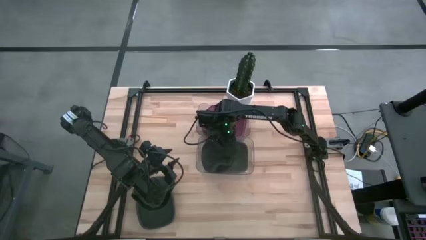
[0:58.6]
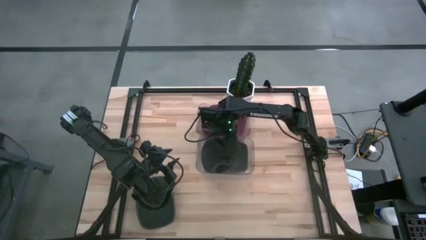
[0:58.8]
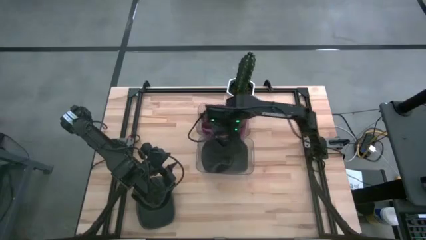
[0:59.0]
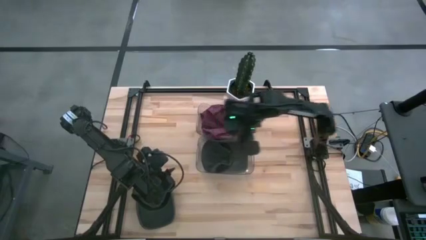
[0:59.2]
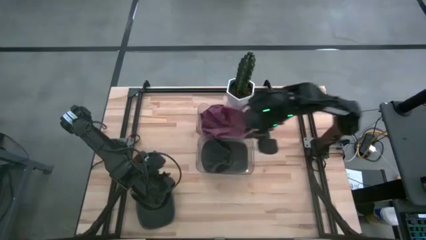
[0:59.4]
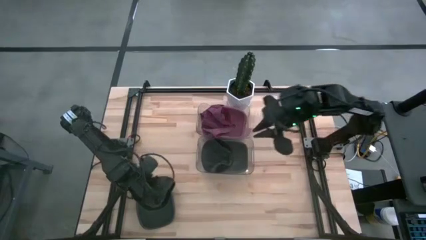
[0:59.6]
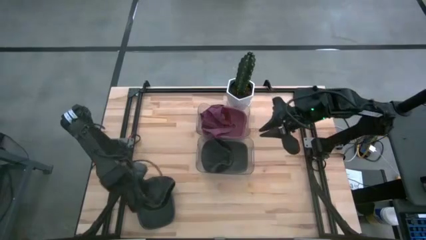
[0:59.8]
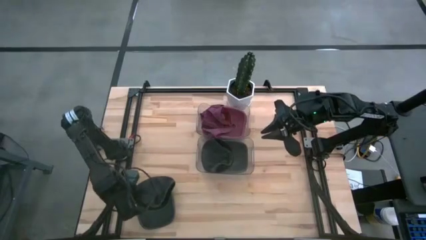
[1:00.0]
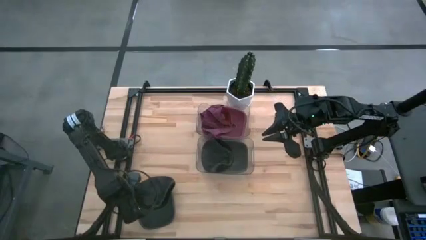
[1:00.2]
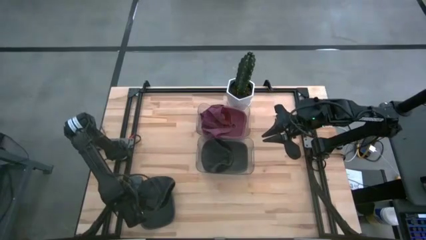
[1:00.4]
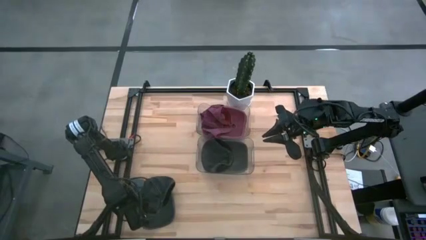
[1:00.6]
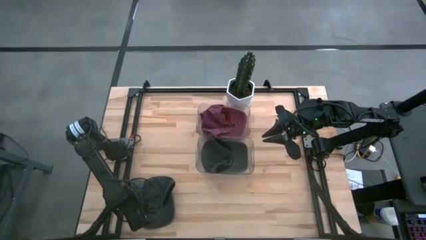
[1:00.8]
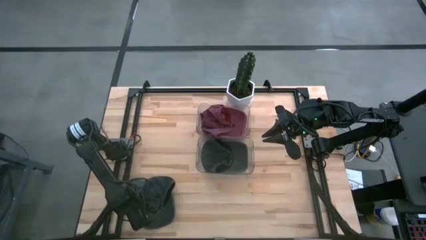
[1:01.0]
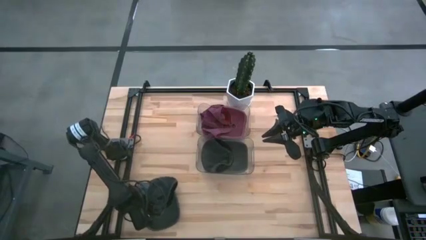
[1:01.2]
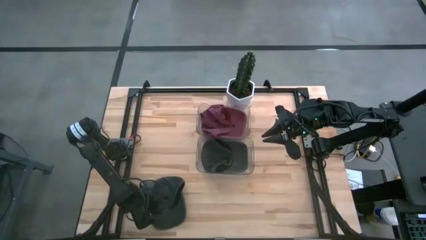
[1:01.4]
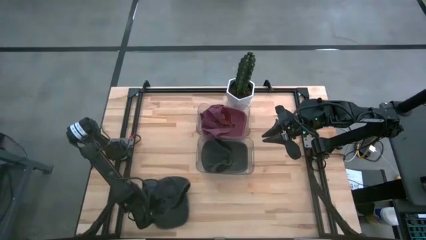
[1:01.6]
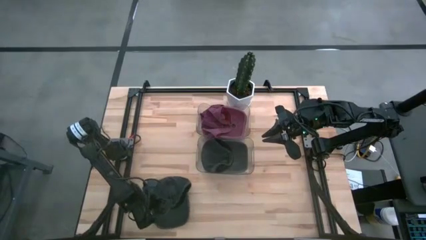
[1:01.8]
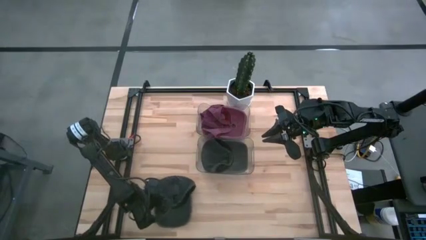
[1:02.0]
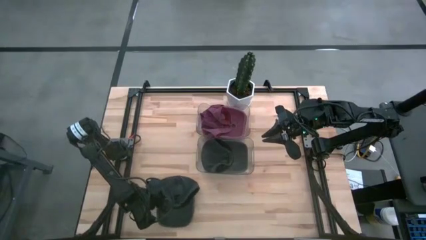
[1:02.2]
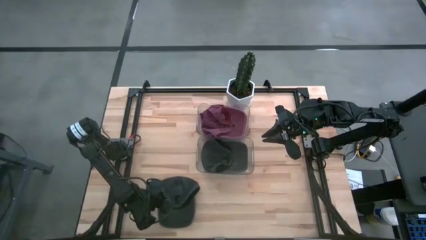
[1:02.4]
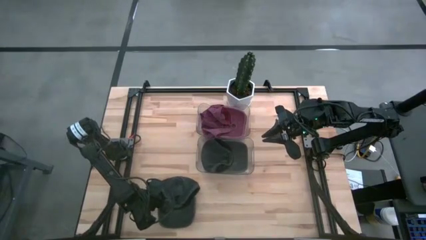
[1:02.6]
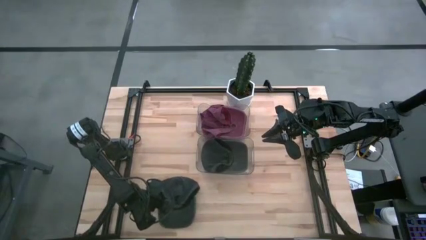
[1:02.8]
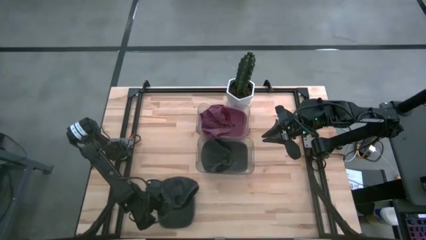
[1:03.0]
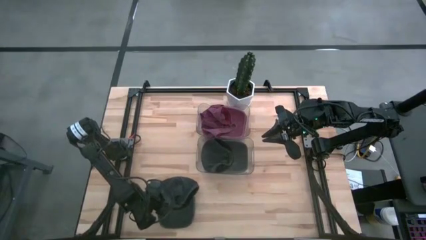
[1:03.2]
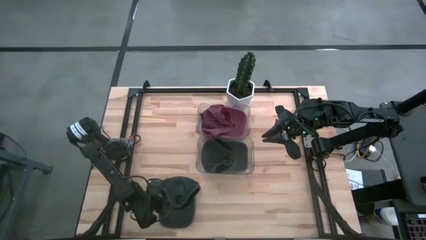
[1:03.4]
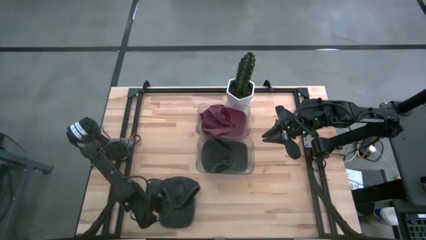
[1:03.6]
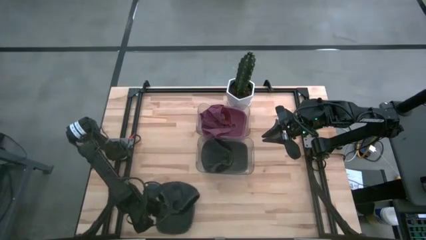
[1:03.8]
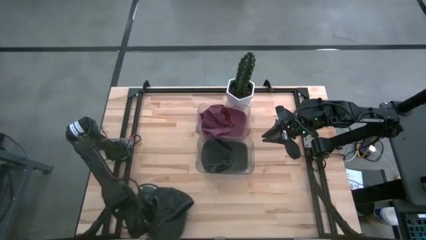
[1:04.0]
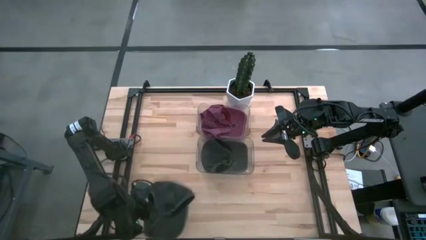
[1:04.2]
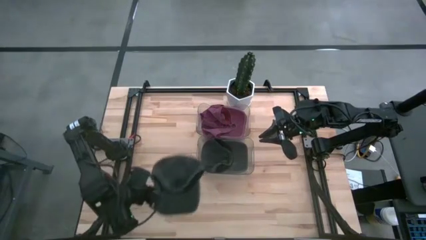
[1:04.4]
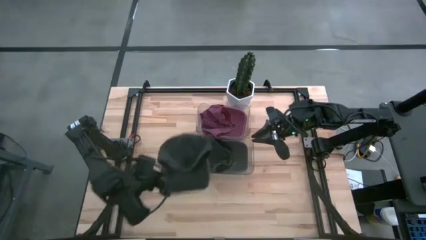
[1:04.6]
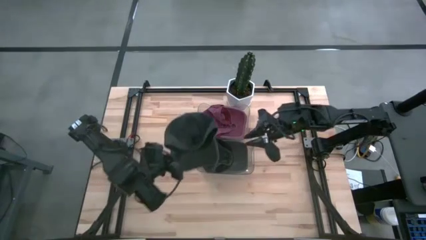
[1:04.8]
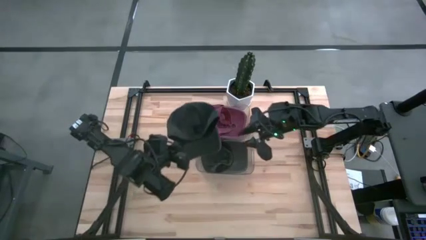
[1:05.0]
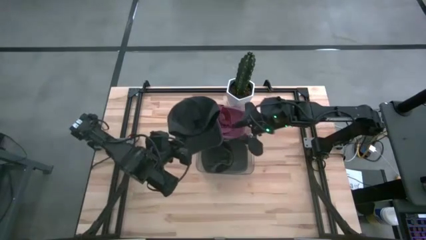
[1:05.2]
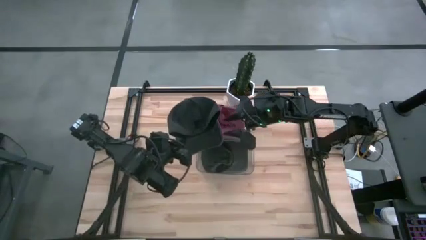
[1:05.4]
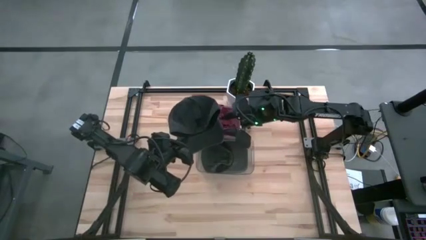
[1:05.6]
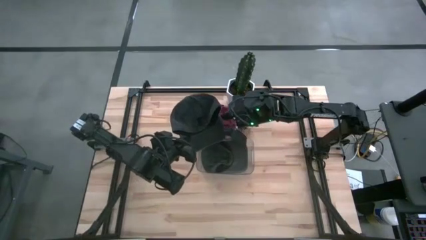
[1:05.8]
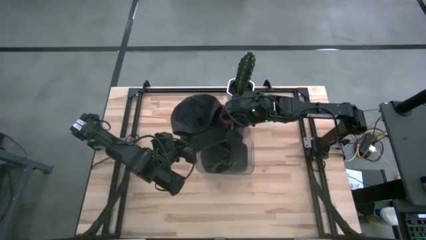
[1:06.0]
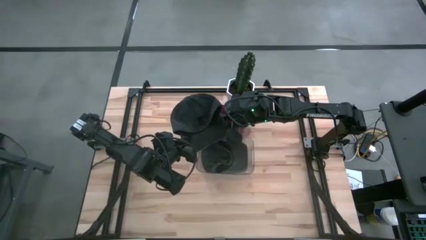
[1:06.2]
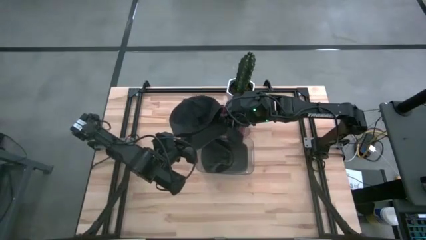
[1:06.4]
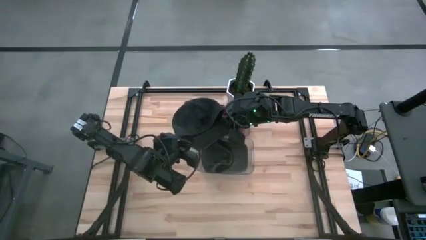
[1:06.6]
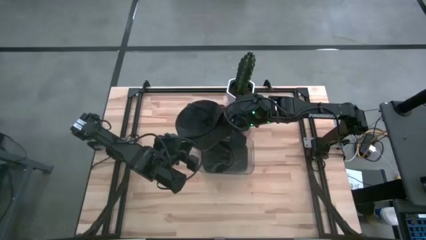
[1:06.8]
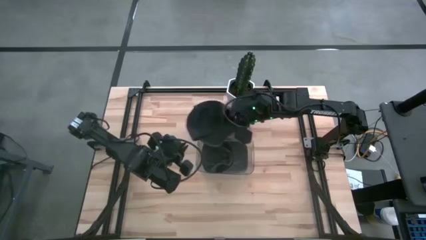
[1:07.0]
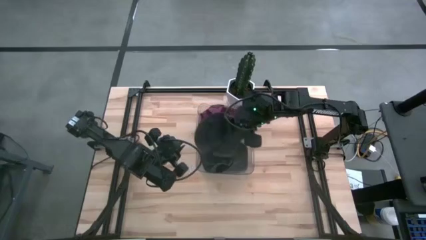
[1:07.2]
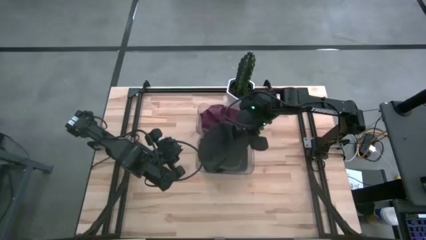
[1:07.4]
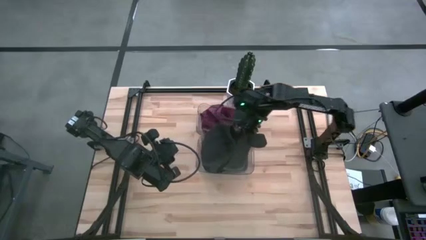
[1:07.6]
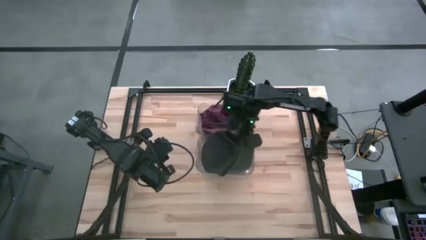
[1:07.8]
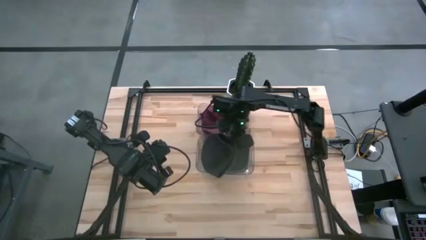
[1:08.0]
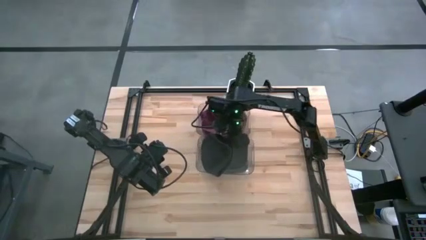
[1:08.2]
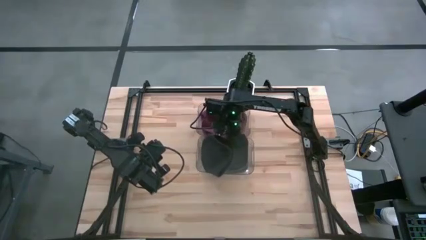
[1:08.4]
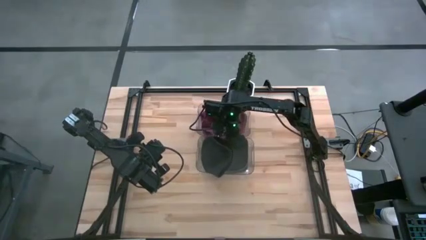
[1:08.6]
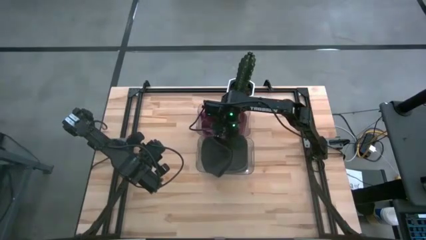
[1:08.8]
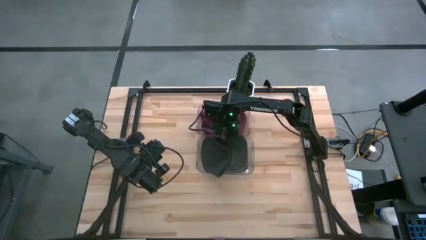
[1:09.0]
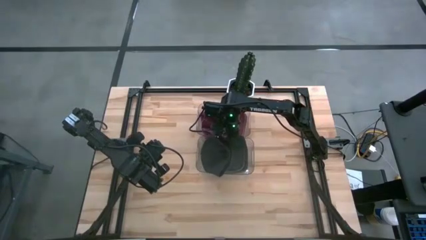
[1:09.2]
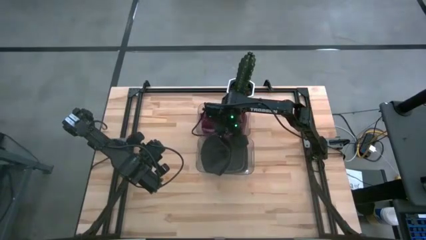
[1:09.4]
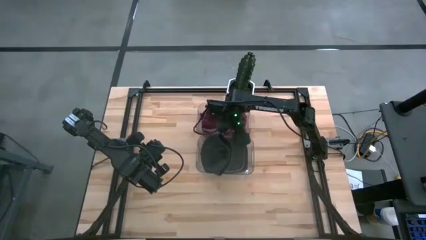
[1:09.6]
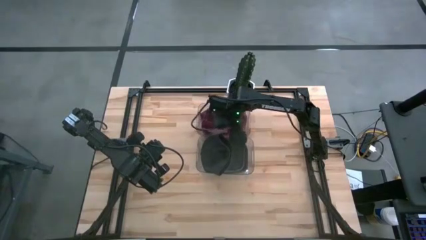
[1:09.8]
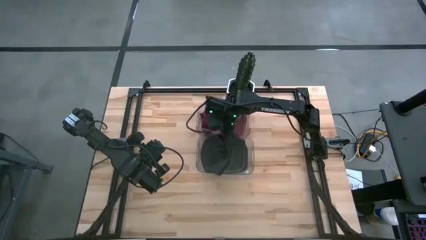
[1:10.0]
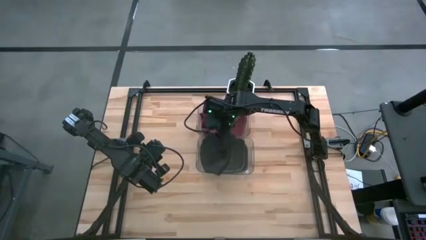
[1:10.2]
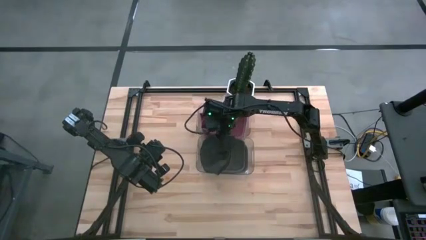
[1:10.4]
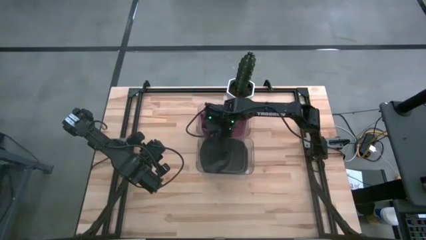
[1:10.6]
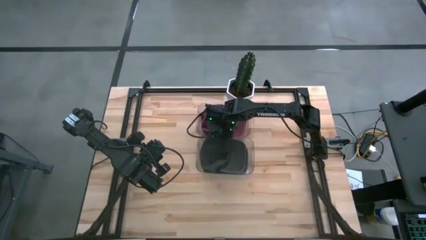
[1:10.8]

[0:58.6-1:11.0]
Task: Pick & Place hat
Put the black cap into the bottom transparent bin

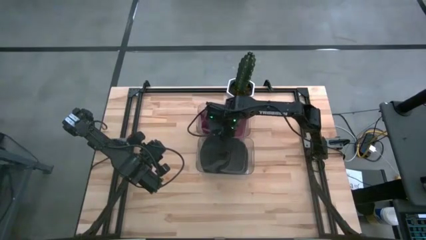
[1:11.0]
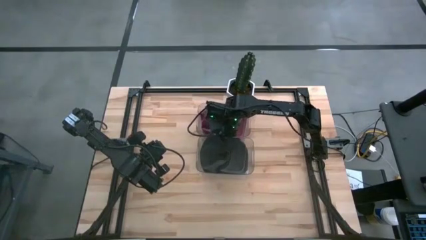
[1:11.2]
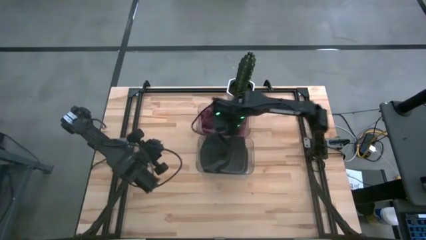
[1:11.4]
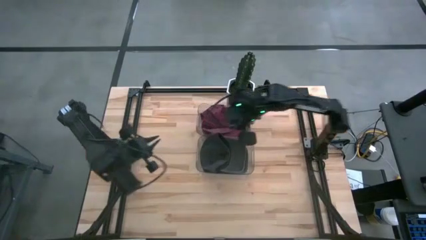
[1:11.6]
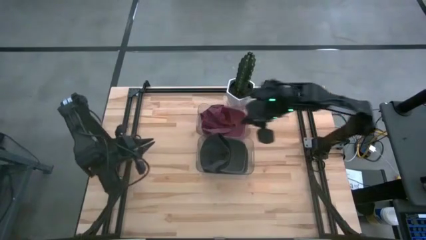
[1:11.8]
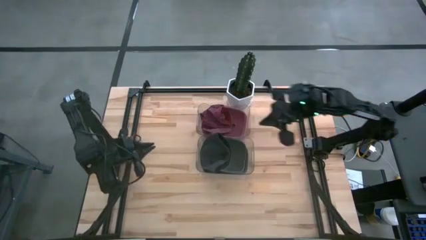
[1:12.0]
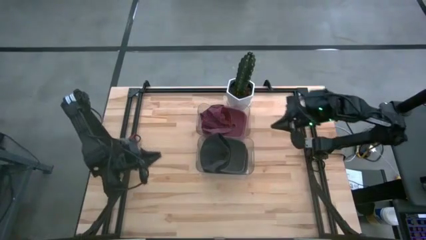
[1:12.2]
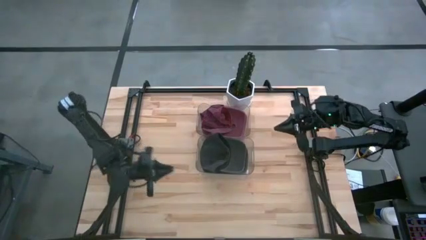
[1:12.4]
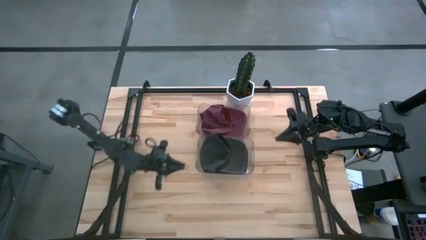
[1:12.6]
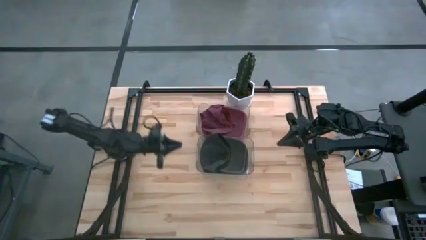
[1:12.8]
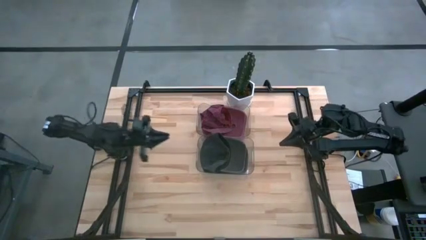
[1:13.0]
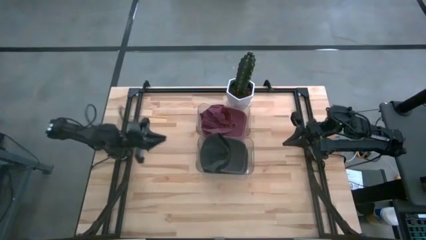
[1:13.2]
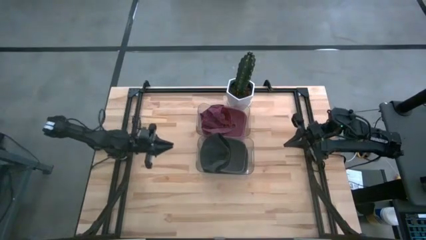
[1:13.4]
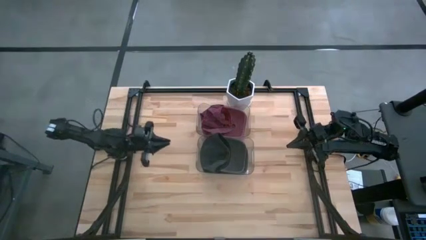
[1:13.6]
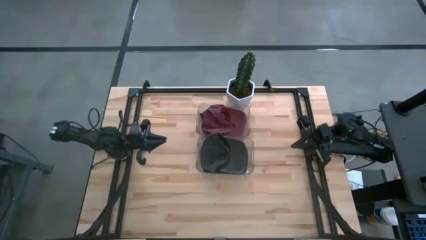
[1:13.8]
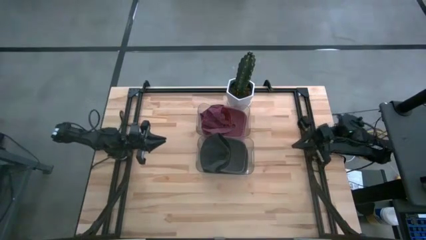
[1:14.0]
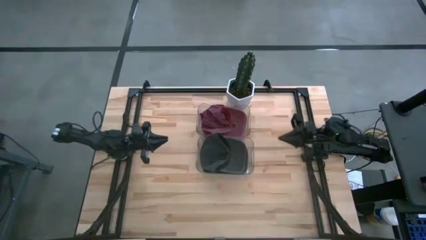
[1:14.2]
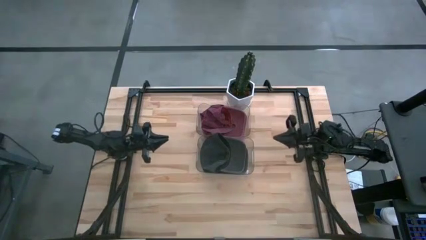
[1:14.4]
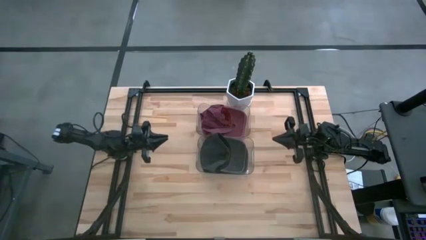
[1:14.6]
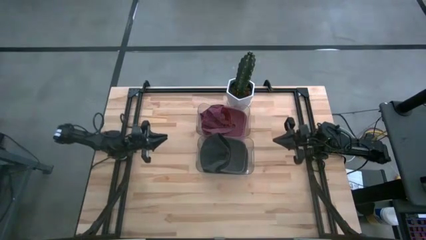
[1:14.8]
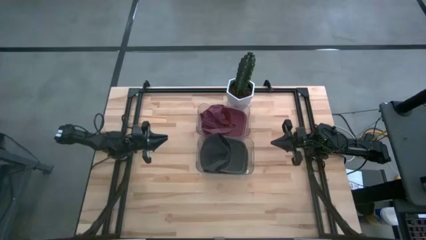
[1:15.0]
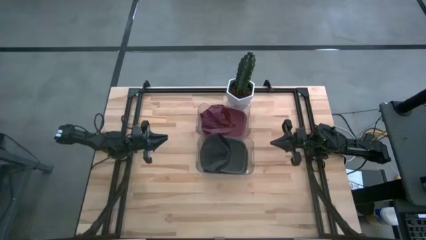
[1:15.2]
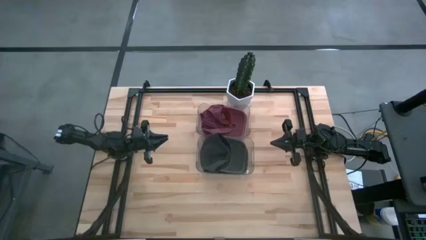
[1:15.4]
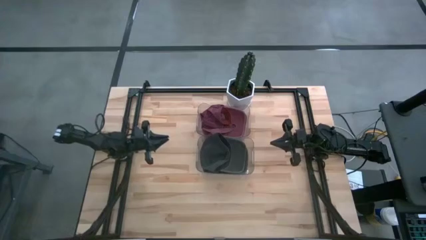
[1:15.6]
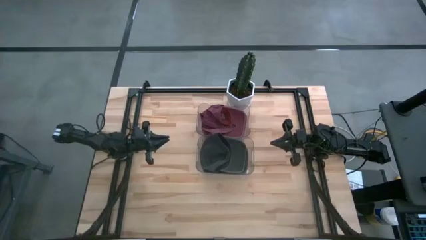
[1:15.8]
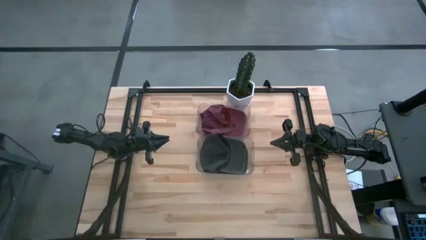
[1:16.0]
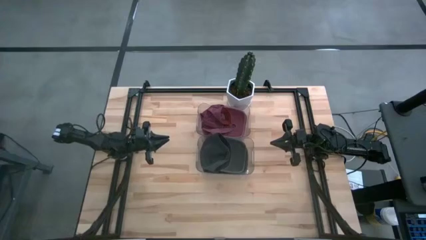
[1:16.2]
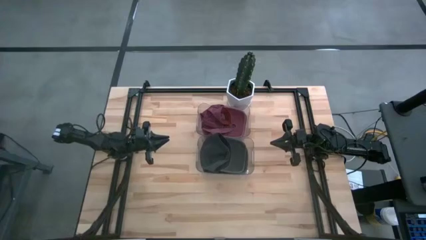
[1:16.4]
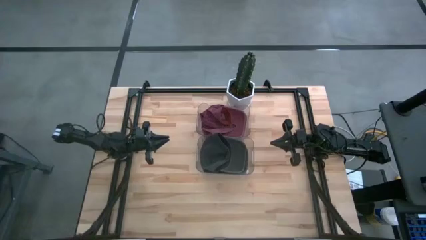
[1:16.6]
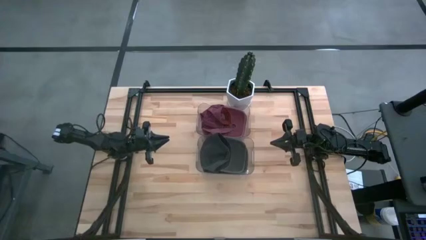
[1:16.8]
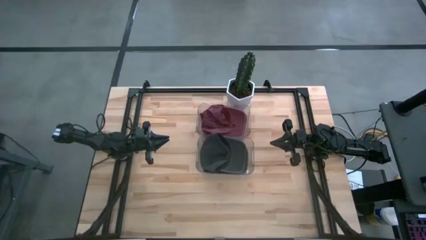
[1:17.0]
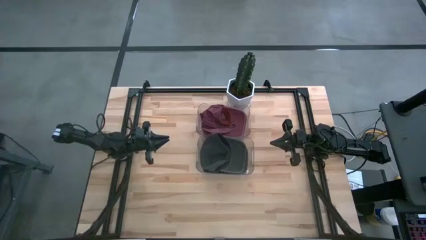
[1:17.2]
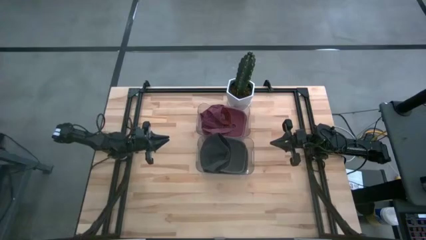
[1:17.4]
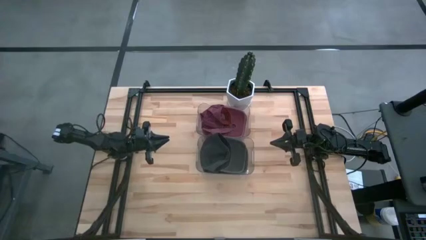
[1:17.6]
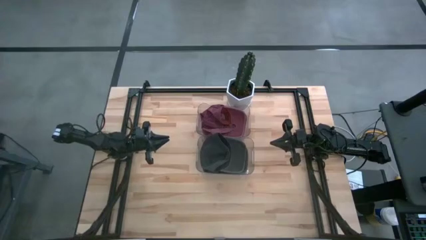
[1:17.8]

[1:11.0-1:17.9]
Return to Home Position
